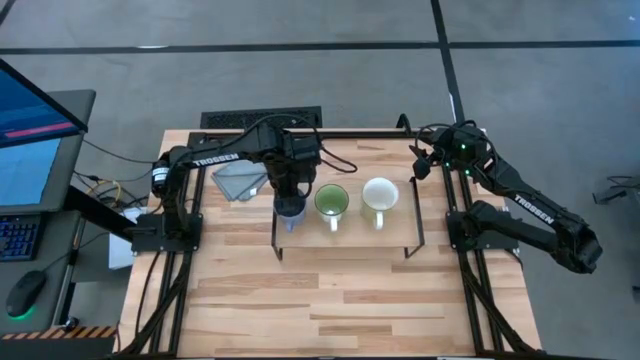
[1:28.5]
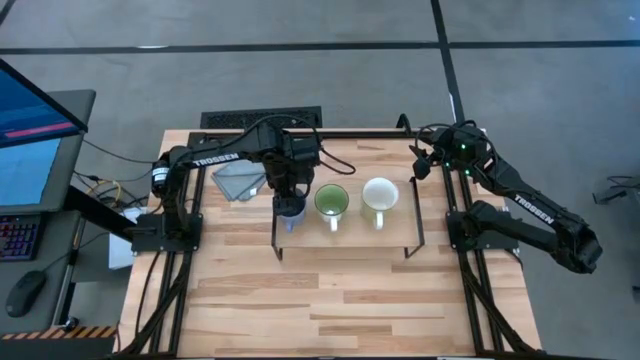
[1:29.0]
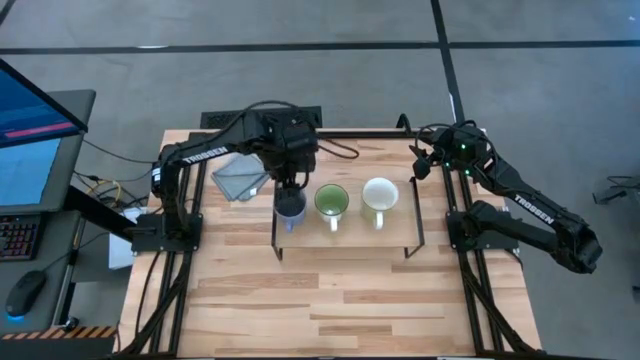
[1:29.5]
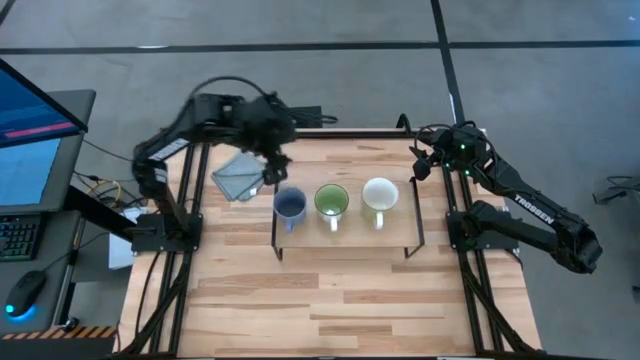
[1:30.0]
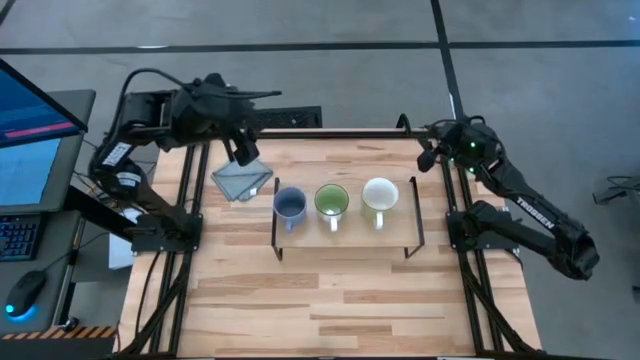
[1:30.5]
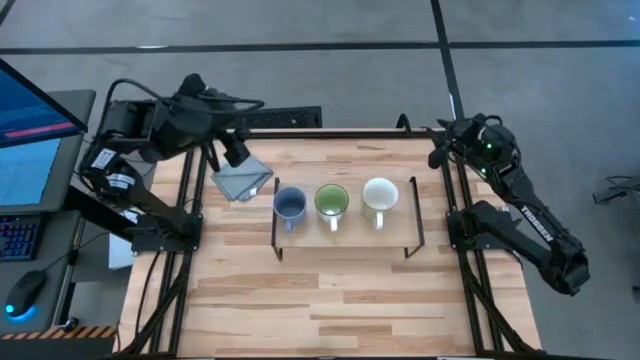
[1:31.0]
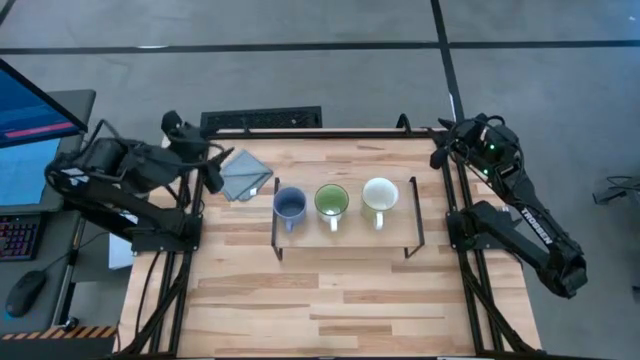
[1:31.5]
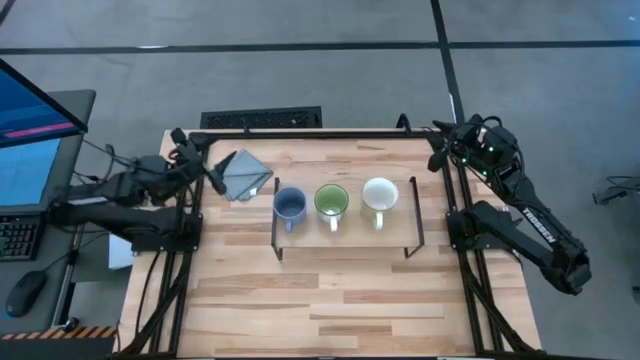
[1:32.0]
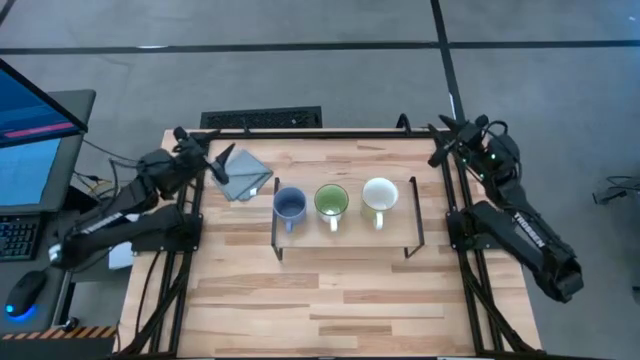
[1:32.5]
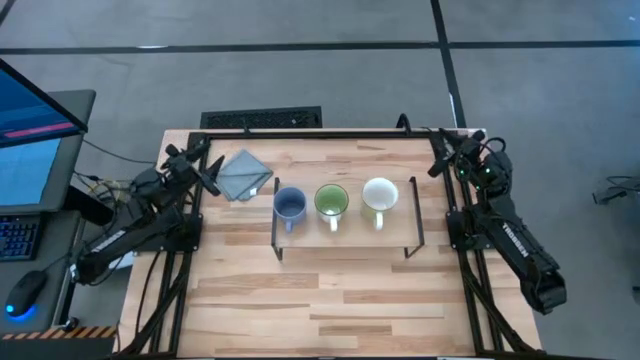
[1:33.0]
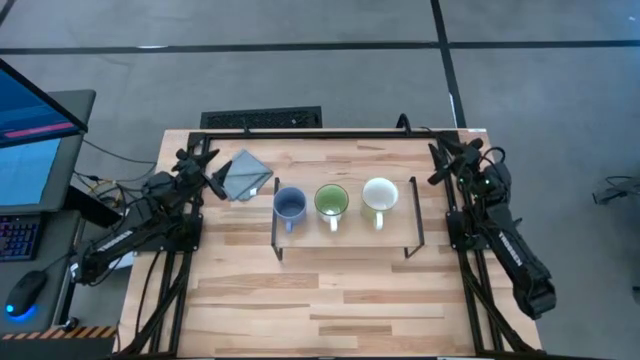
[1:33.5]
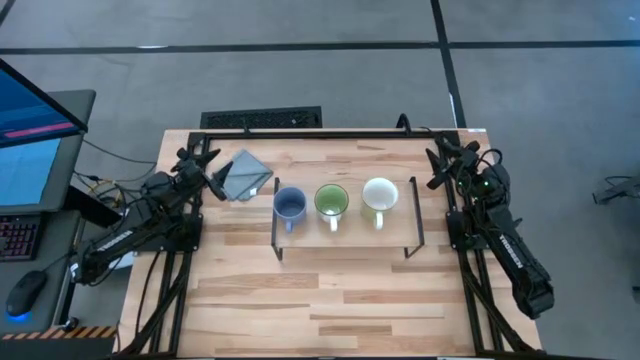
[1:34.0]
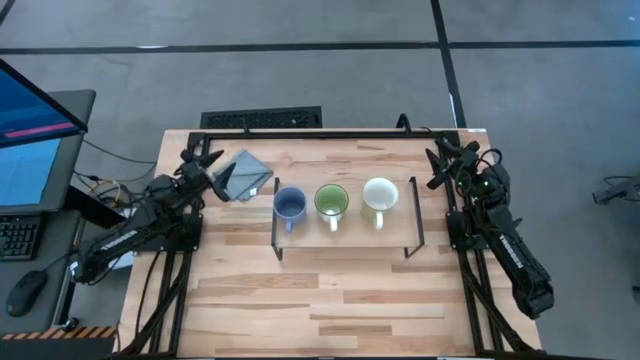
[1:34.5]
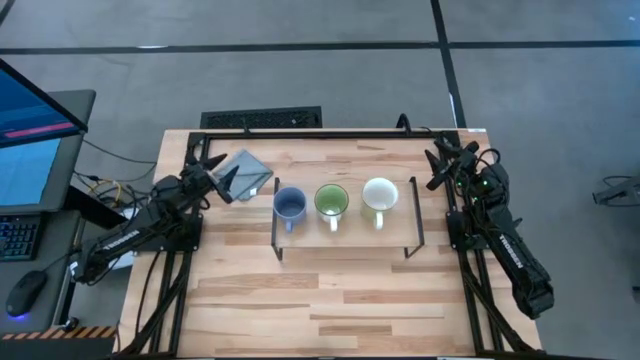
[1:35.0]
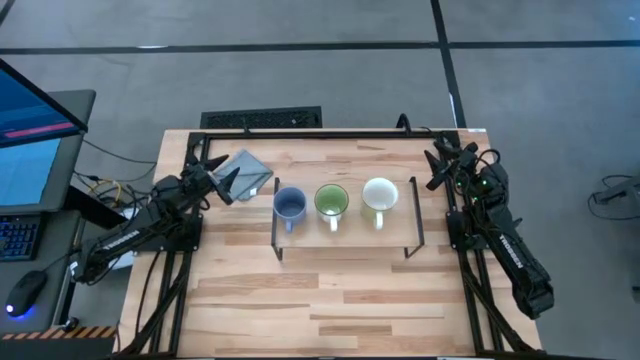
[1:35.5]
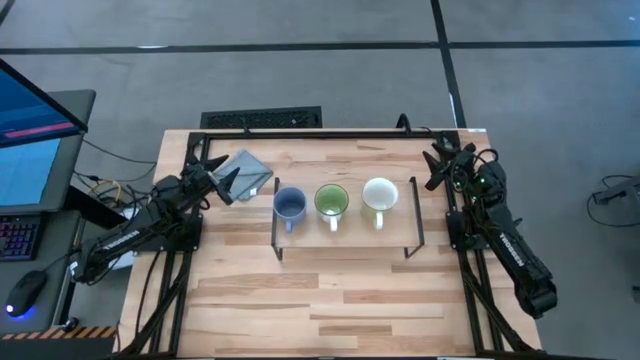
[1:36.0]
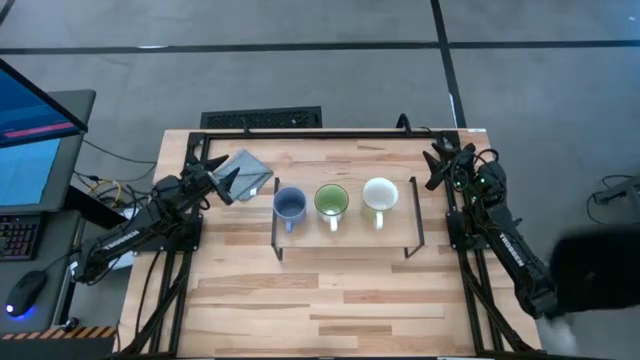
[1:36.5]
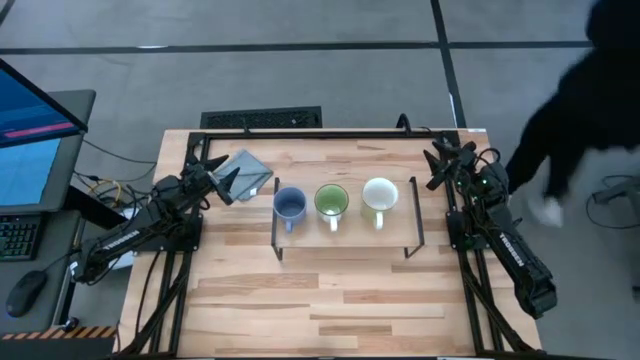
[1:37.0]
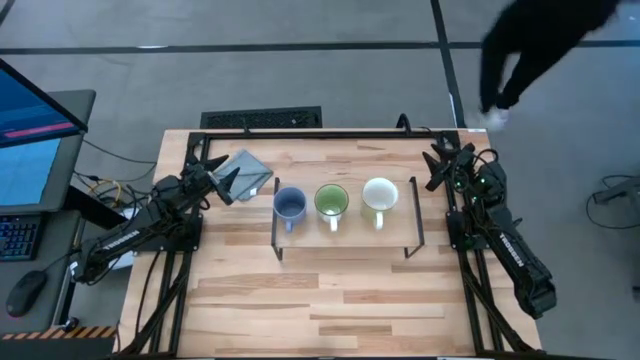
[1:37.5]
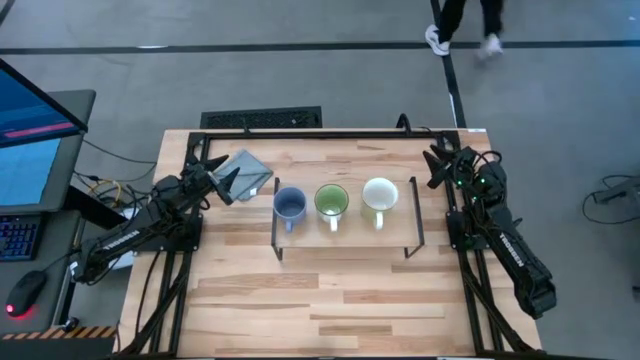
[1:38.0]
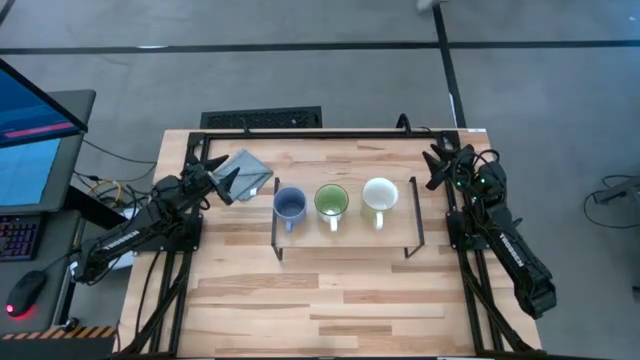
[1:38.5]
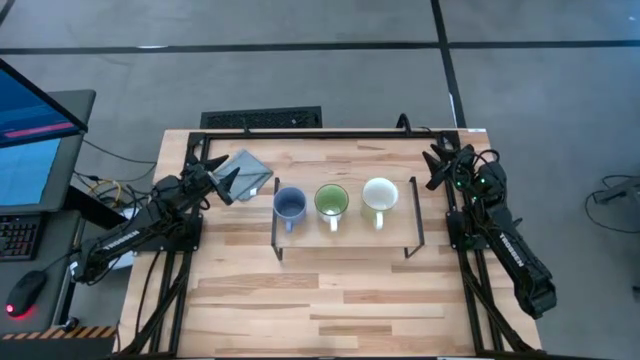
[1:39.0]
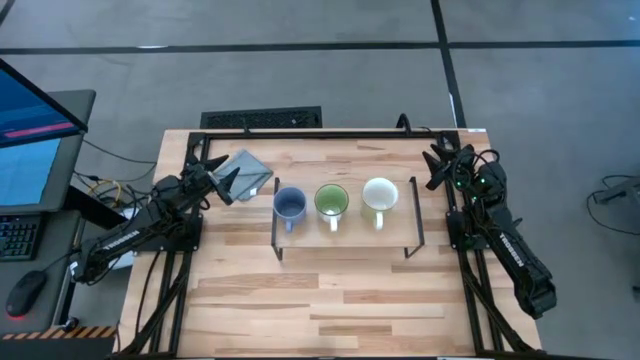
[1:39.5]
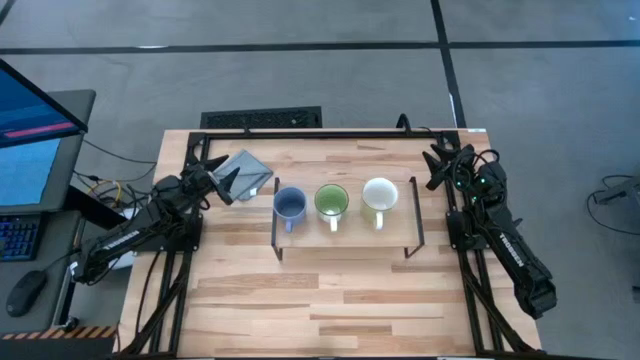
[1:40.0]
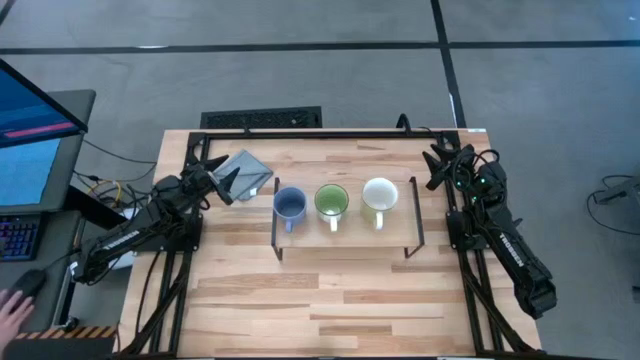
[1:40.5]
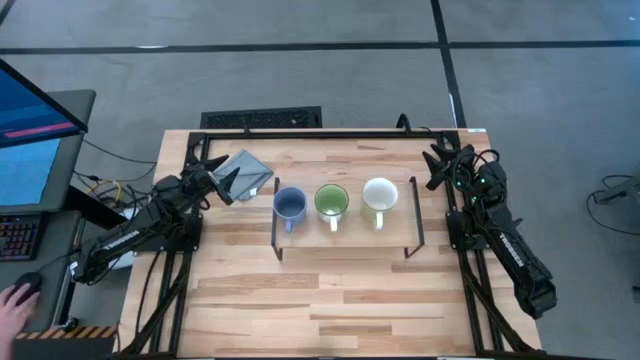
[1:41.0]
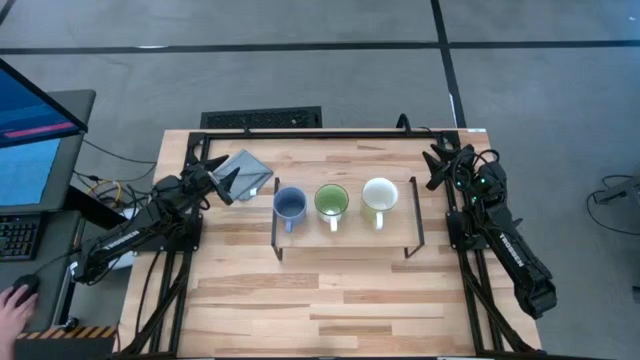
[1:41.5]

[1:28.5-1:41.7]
Task: Stack small to large cups/mugs on shelf
Return to Home Position

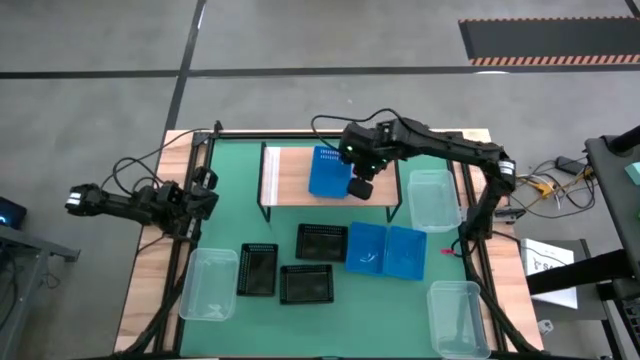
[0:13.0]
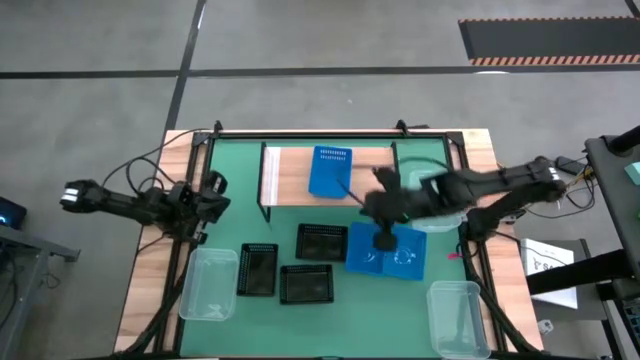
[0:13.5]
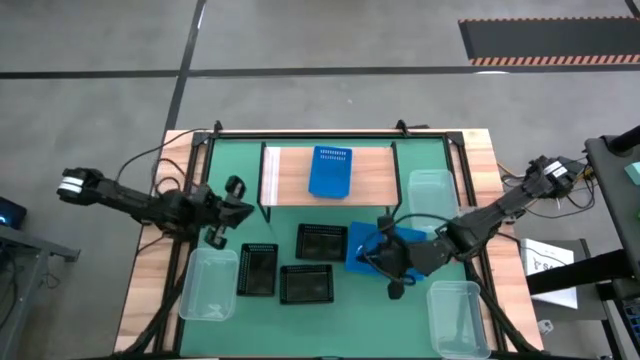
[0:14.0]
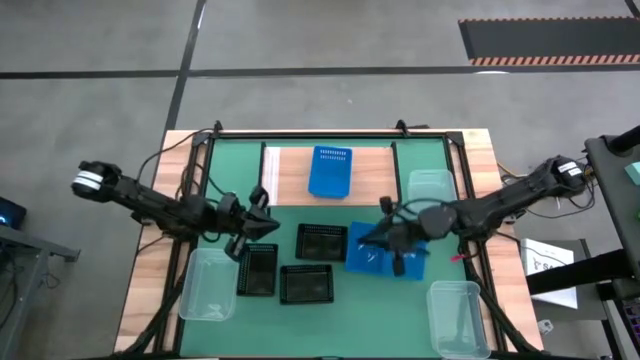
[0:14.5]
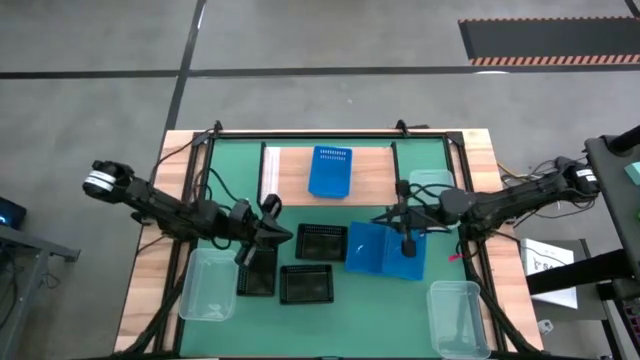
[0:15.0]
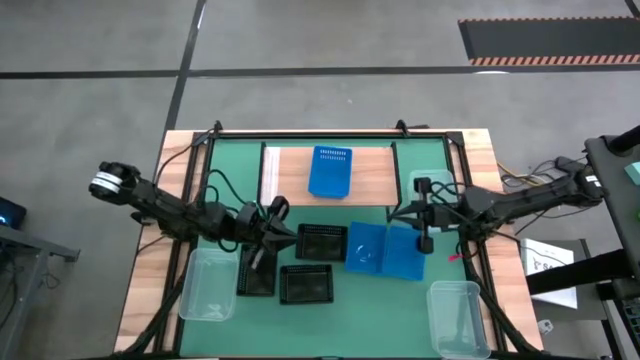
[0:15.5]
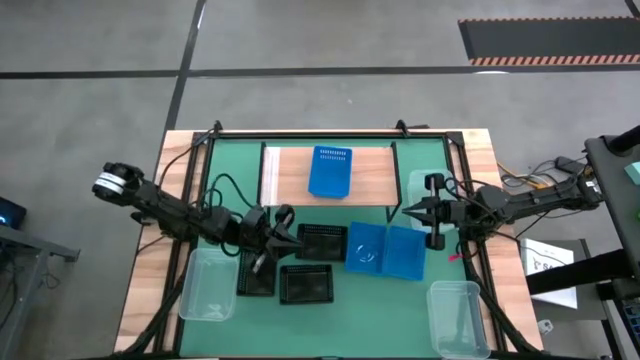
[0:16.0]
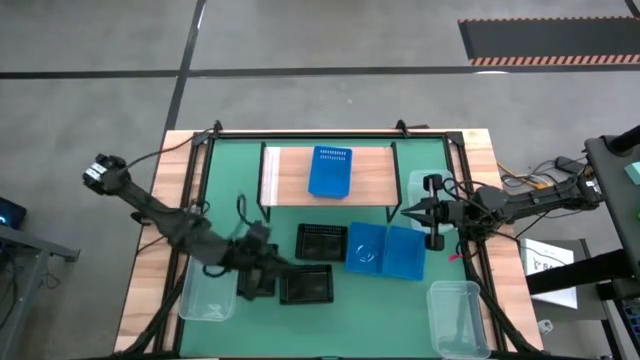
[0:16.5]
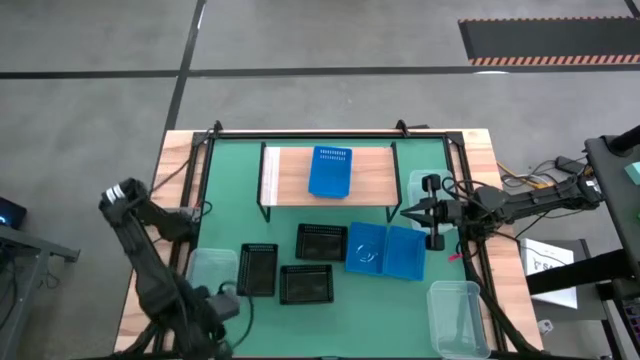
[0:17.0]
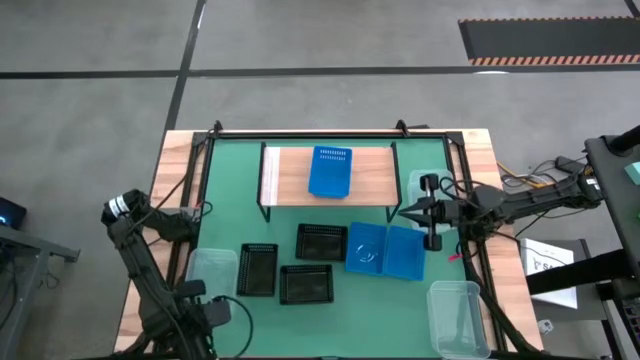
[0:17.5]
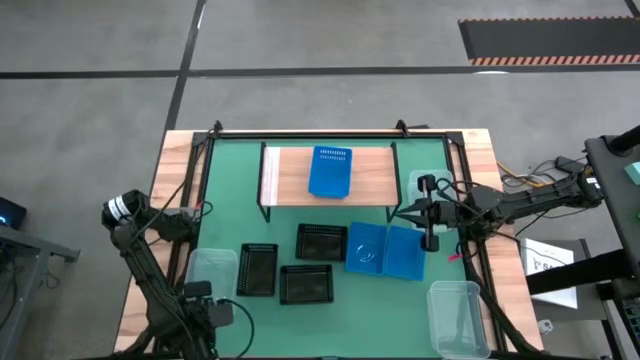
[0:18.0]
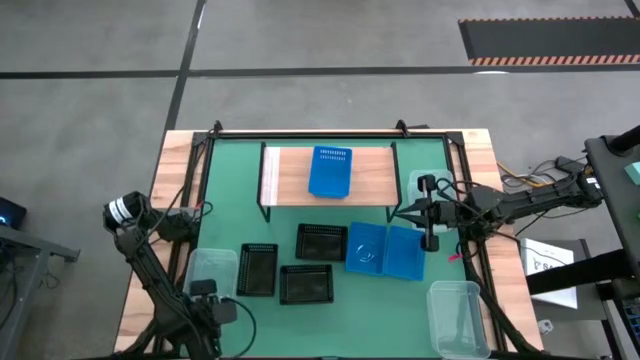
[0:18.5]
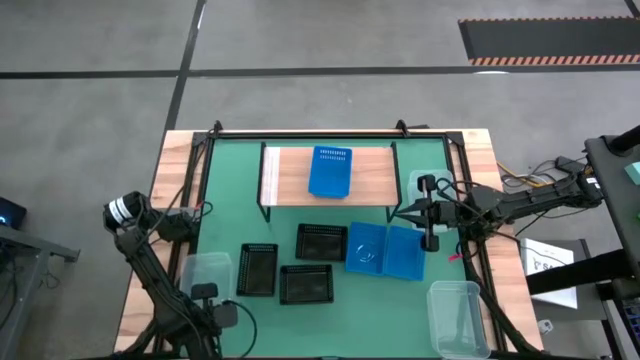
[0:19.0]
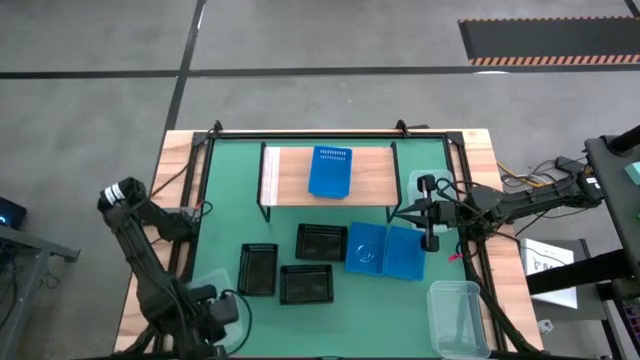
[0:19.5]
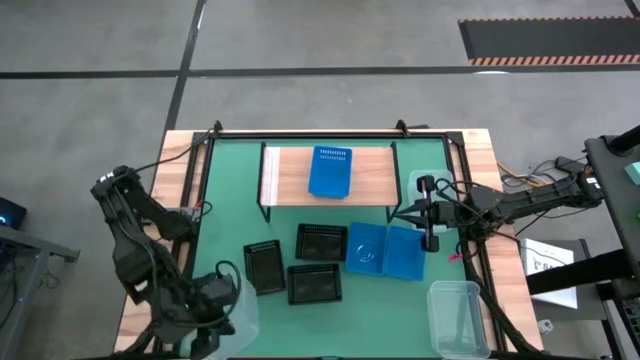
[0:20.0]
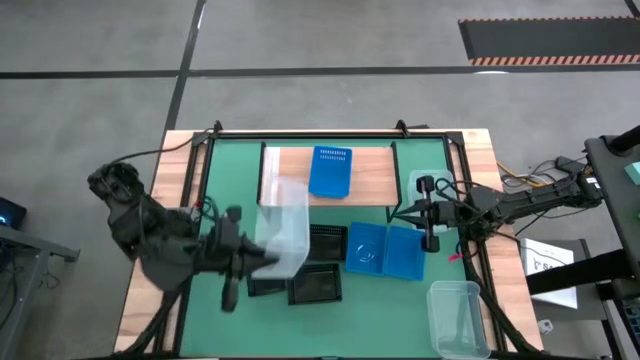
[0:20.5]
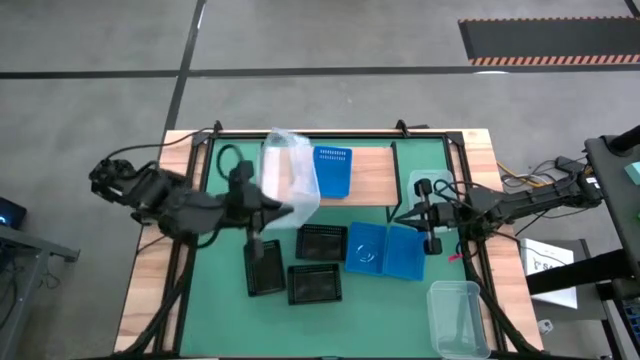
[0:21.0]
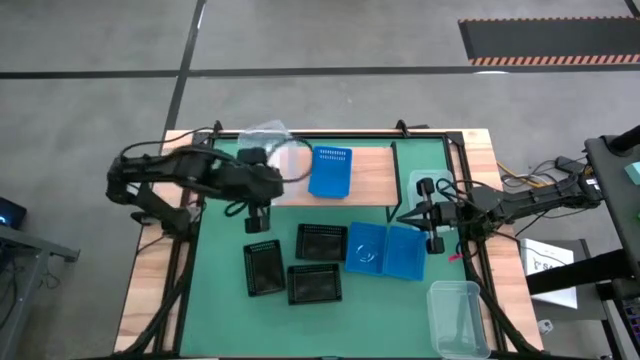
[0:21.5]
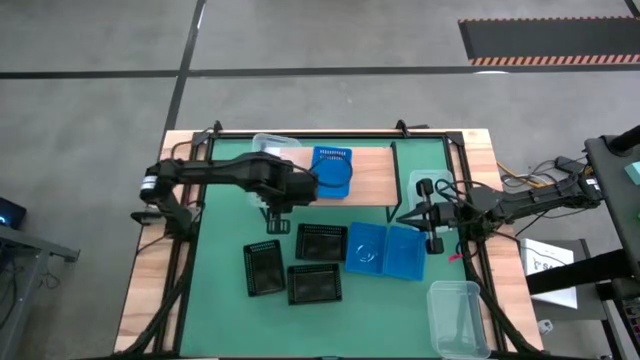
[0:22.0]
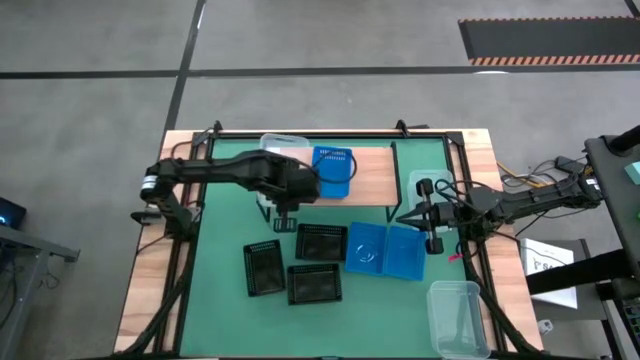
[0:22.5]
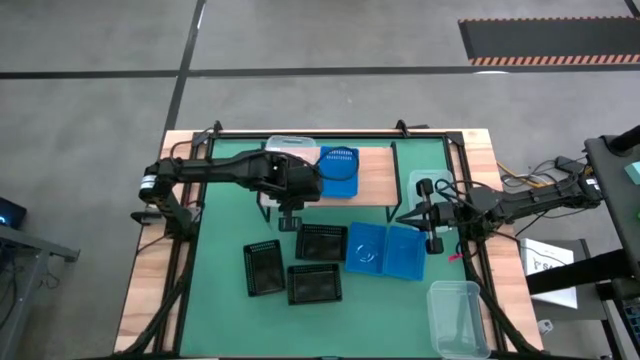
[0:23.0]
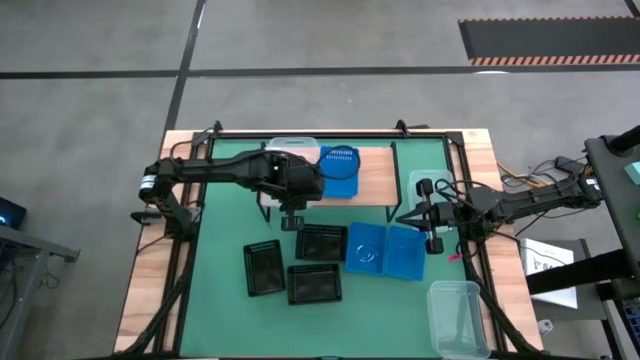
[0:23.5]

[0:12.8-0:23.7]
Task: Stack baskets on shelf by color
Put the middle transparent bin on the shelf
